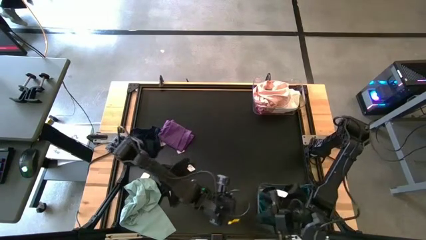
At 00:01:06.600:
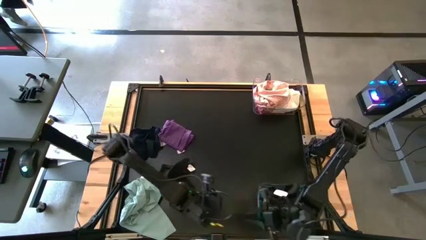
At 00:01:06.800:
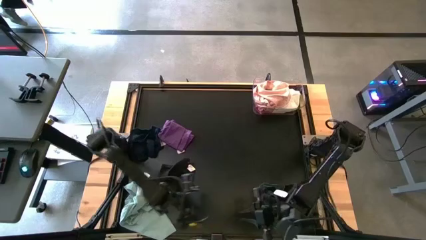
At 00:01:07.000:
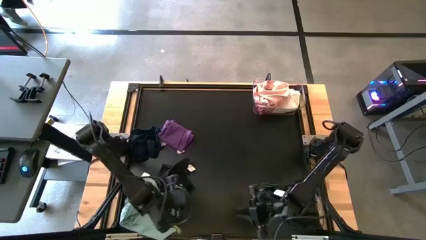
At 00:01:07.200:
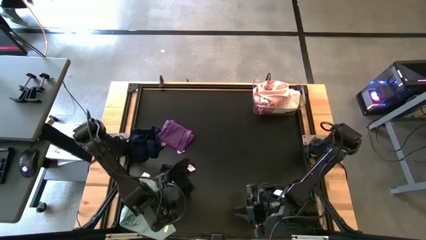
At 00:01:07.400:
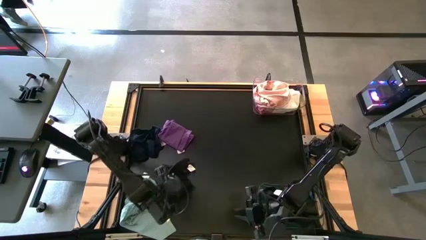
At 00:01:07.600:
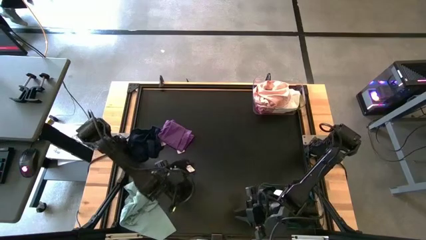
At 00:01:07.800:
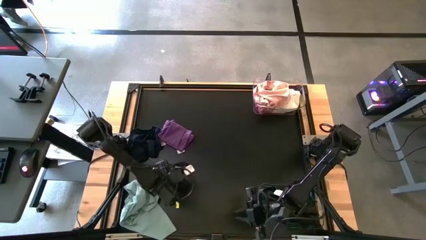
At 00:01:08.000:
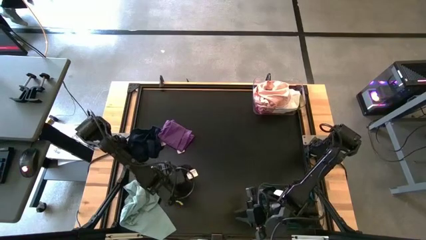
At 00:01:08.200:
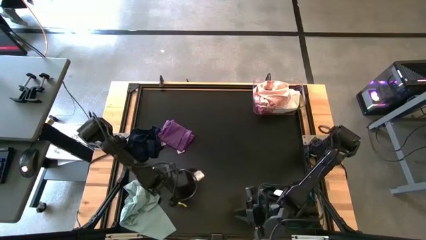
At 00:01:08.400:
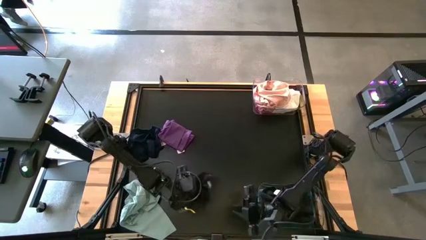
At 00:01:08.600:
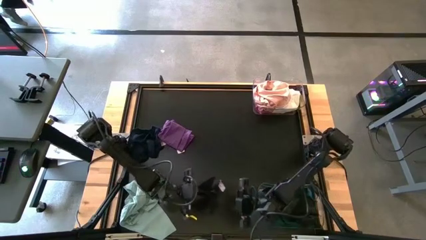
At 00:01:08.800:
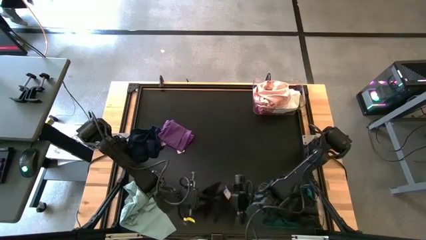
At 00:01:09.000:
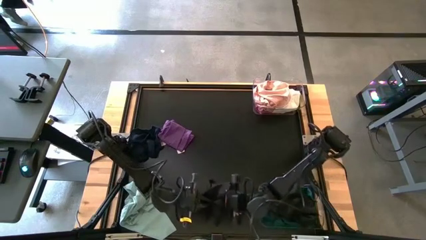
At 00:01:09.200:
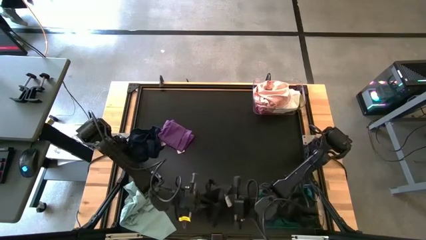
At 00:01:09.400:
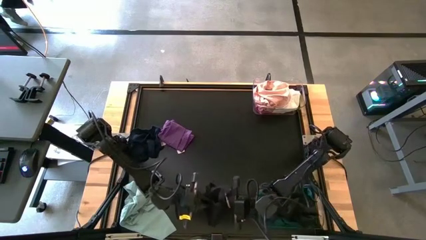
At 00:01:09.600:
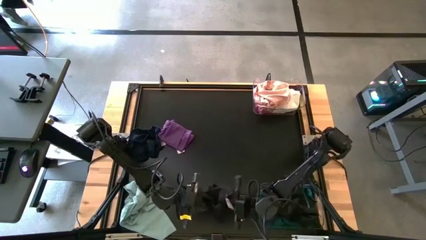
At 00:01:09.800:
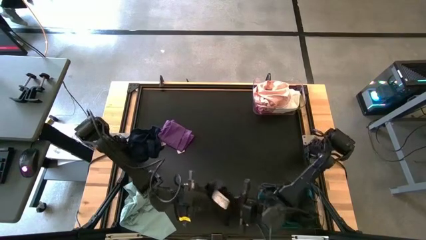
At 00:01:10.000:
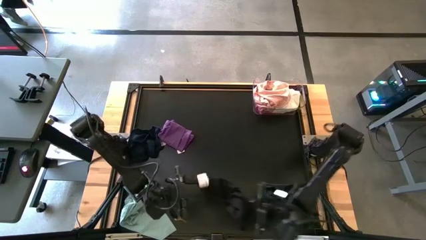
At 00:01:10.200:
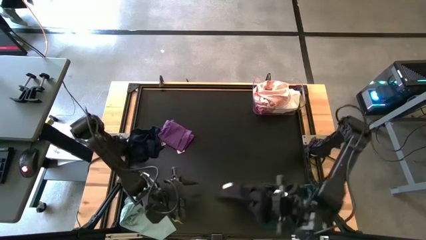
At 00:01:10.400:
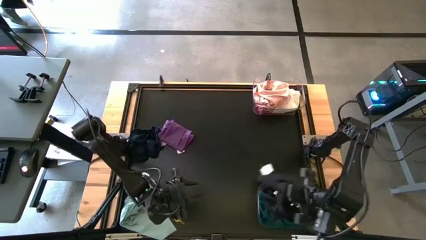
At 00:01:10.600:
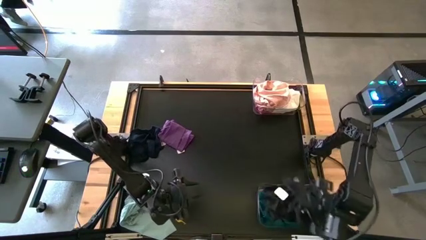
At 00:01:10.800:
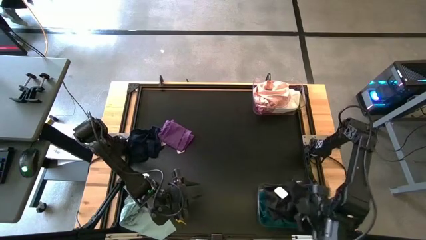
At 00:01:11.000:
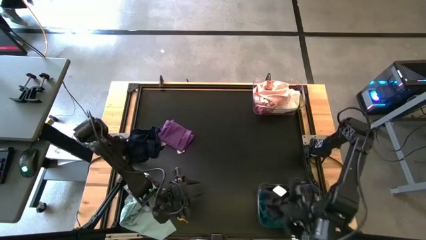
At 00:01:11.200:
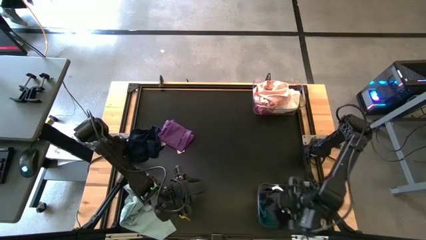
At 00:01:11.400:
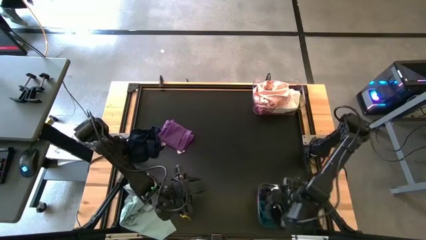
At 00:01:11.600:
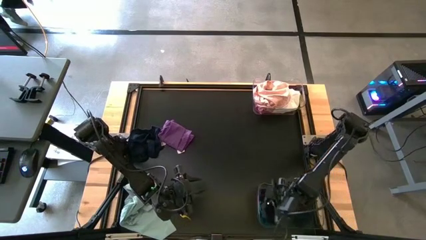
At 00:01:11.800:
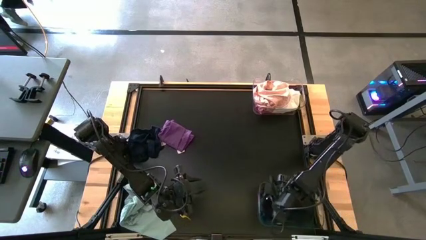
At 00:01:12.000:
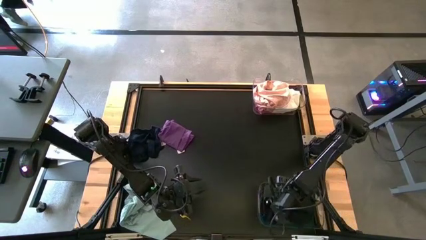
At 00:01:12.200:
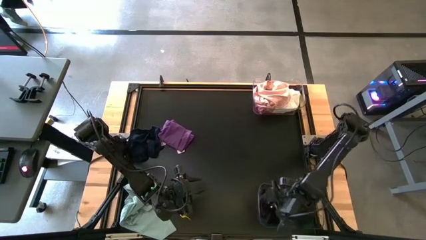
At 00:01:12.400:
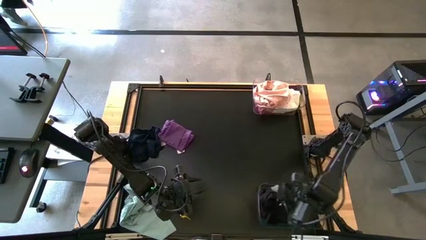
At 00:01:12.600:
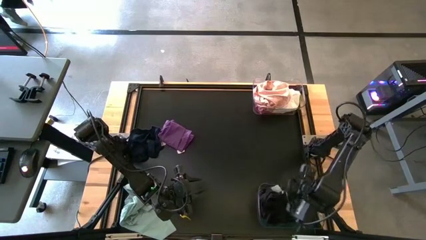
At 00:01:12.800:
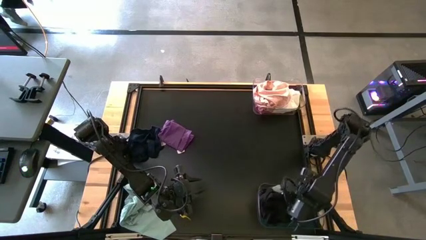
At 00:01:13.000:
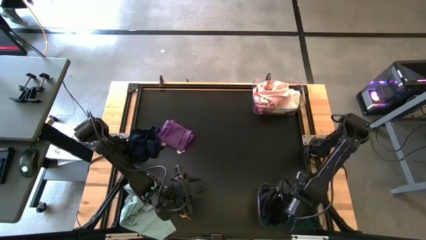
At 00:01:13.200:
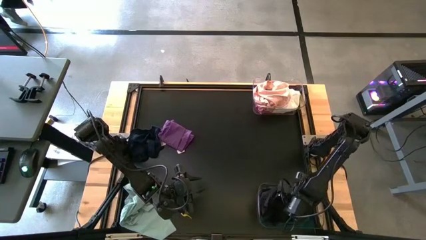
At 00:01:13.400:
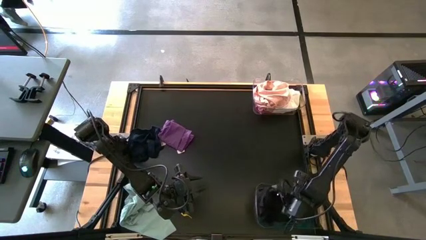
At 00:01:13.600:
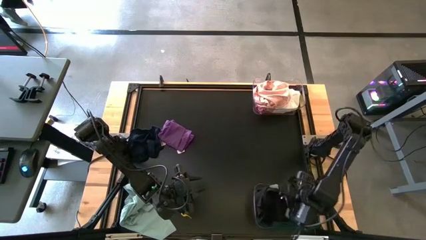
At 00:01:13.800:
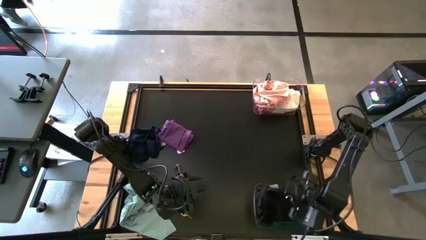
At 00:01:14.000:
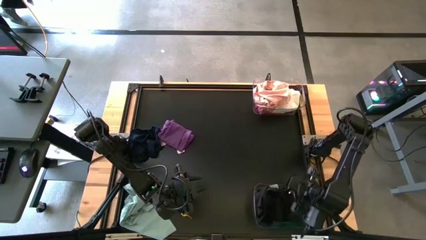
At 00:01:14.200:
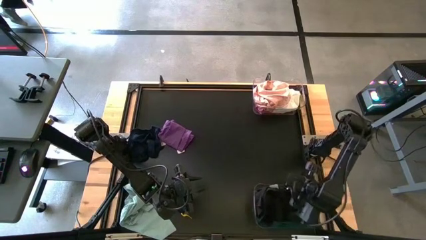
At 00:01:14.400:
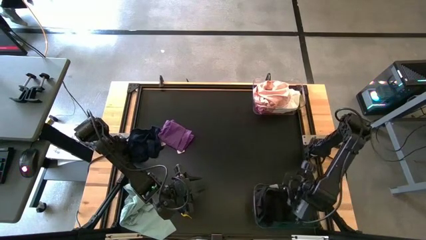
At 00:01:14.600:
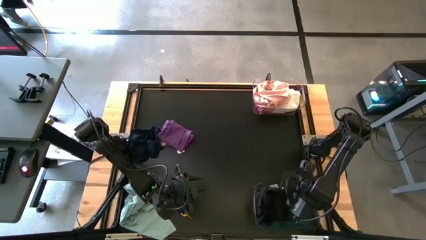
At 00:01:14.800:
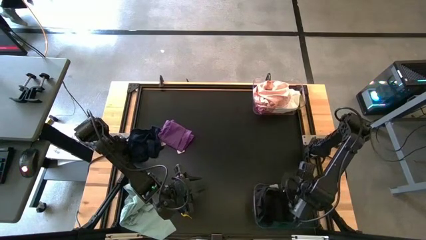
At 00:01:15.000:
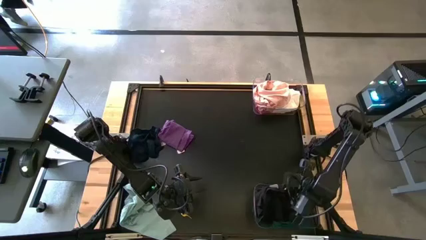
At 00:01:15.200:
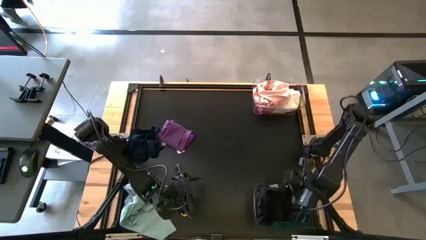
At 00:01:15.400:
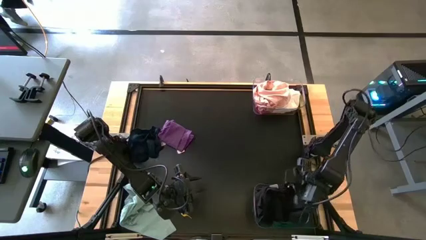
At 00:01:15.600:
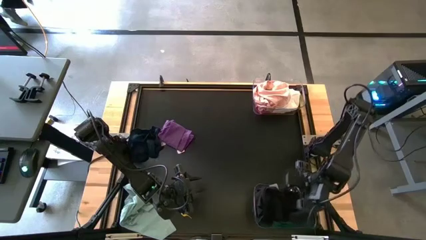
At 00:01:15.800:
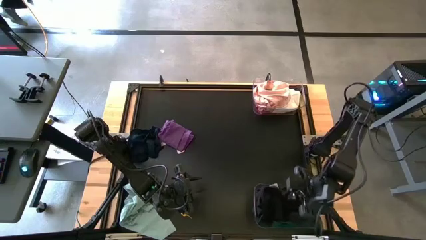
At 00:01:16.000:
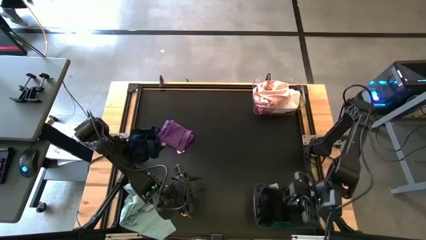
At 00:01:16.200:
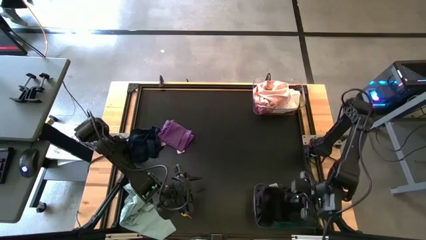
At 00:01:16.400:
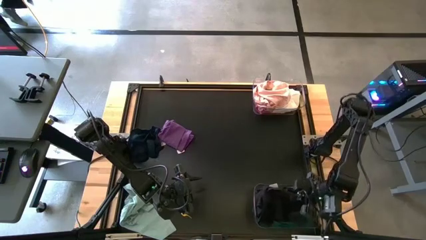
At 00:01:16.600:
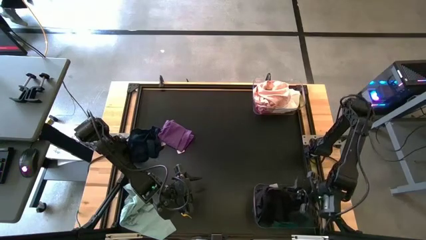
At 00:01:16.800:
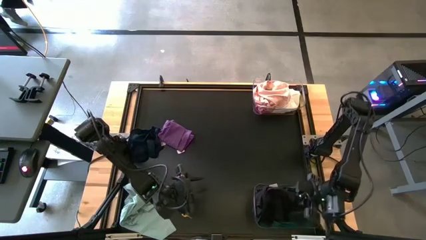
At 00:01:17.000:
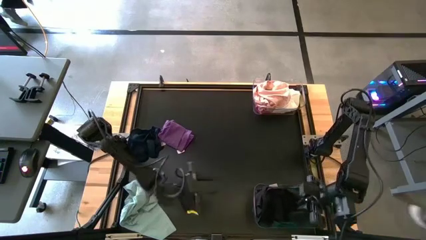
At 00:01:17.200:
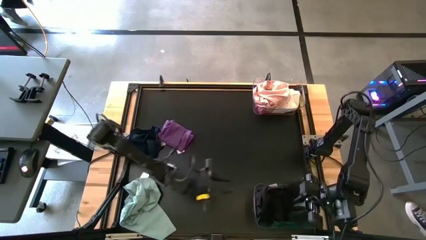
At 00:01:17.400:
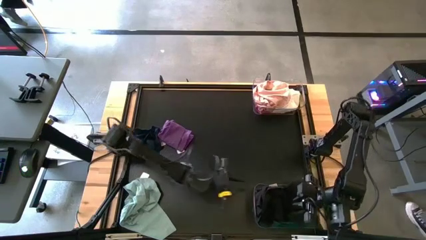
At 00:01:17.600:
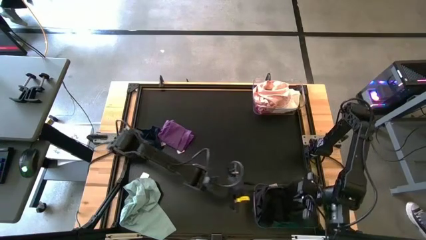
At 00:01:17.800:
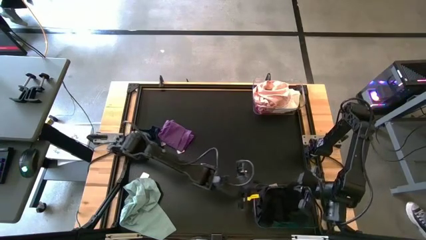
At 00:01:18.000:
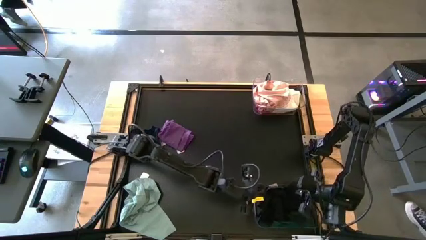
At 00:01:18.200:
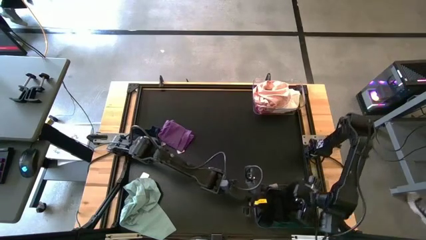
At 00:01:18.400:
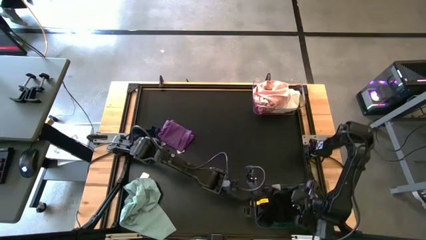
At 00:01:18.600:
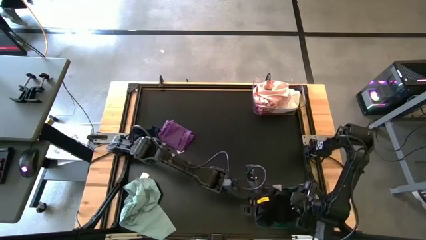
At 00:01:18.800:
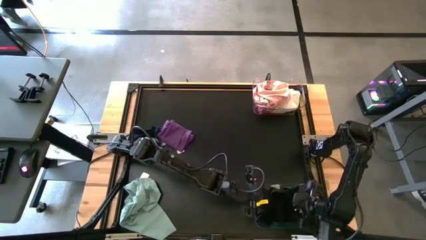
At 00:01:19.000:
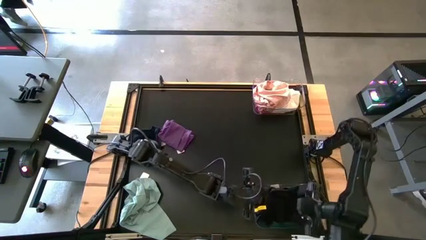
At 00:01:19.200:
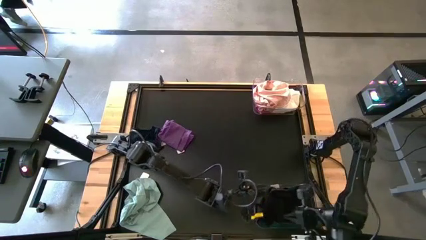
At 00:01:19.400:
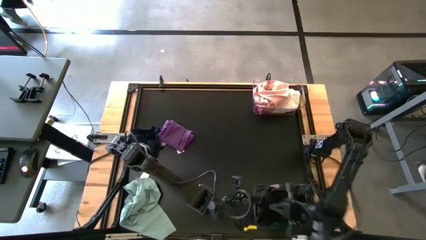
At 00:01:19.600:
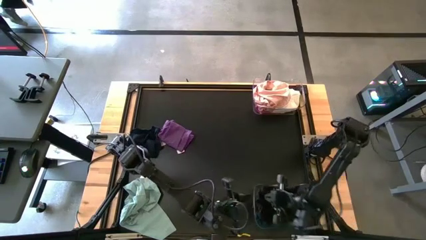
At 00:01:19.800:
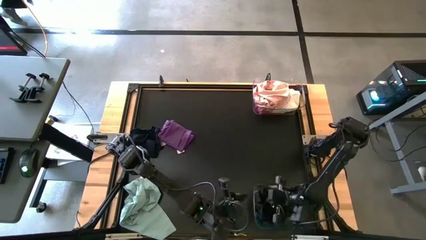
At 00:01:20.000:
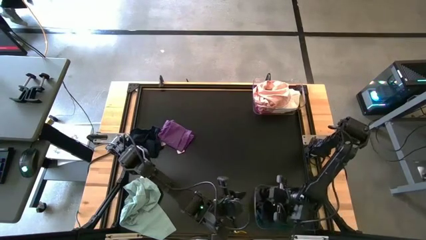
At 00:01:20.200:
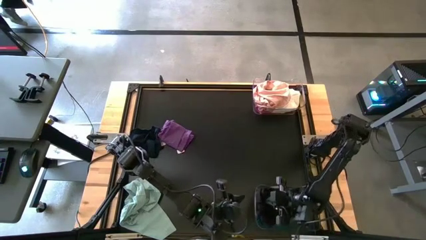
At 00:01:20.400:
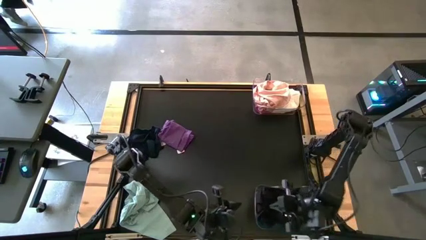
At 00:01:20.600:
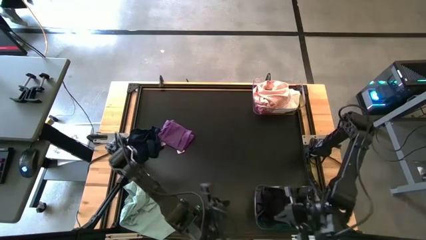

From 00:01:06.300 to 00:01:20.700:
Task: Sort towels by color in basket
Put the black towel into the bottom transparent bin
